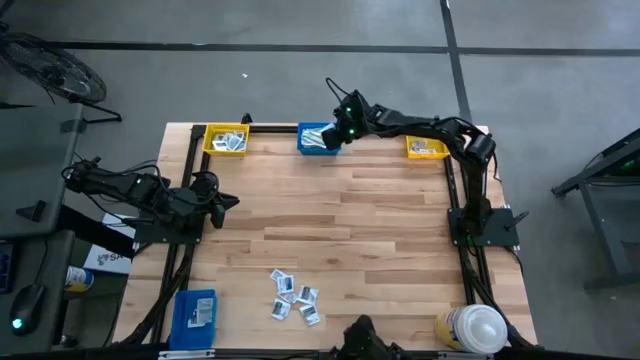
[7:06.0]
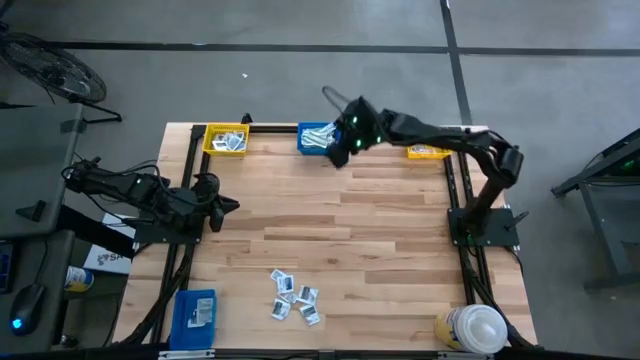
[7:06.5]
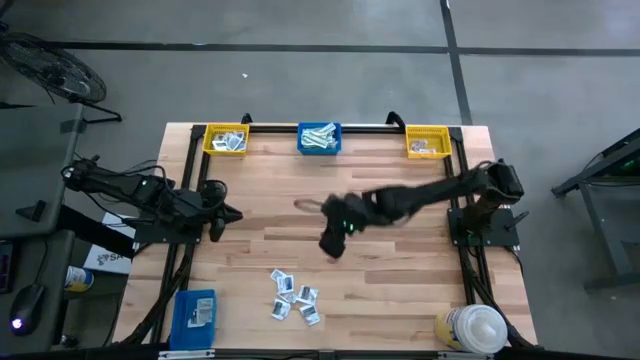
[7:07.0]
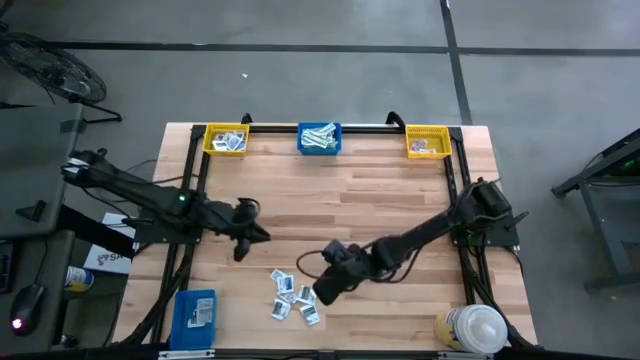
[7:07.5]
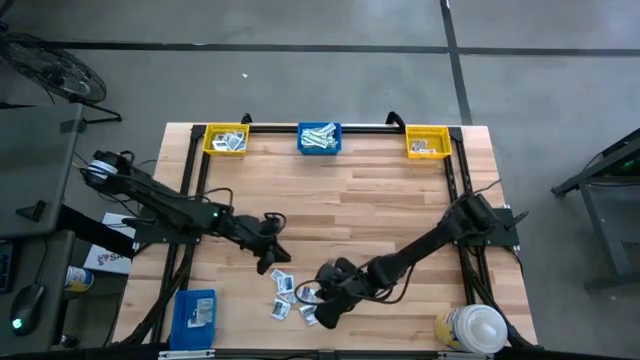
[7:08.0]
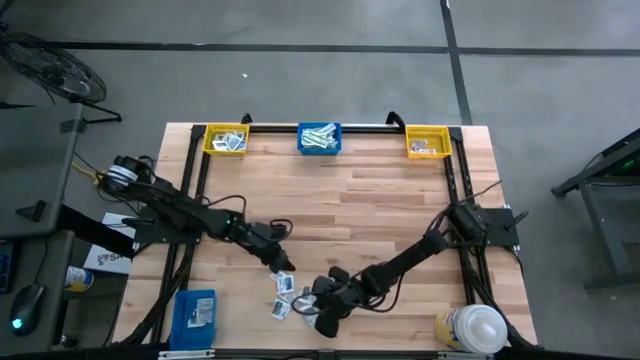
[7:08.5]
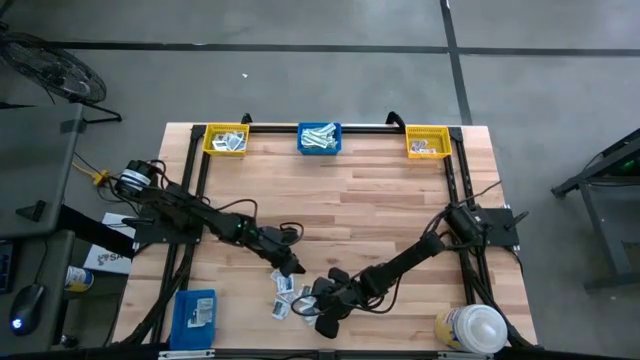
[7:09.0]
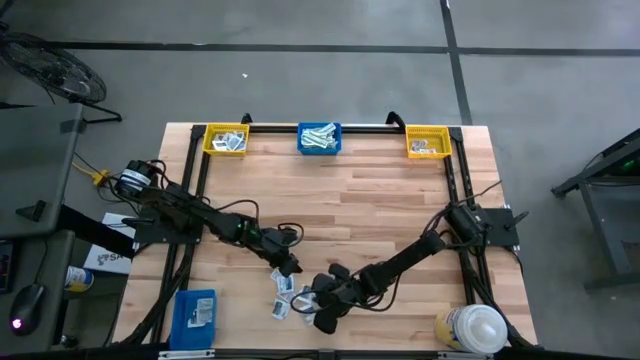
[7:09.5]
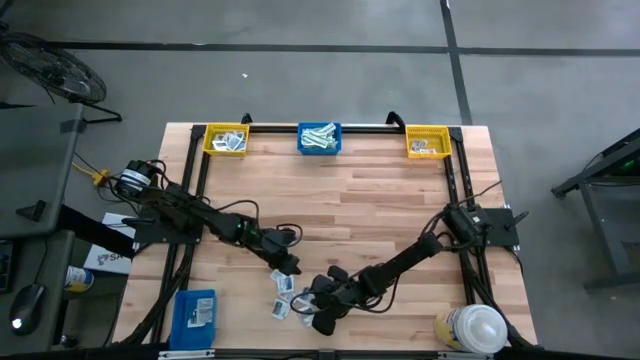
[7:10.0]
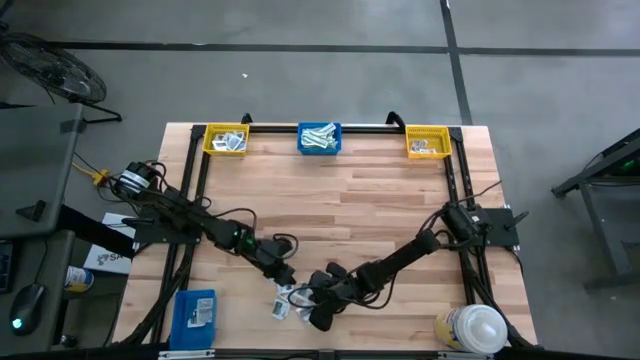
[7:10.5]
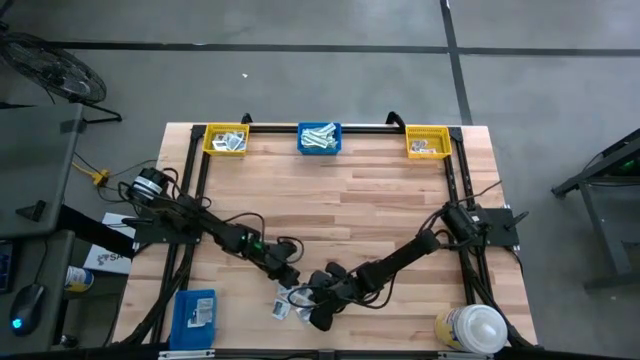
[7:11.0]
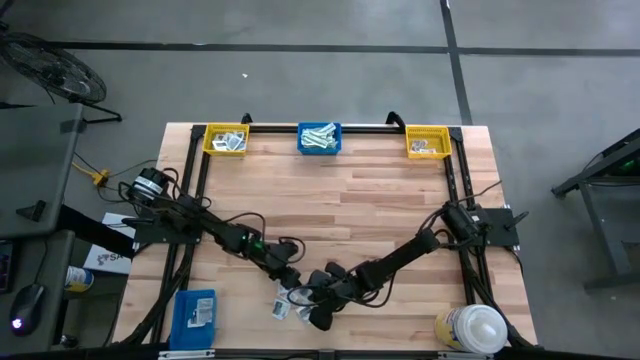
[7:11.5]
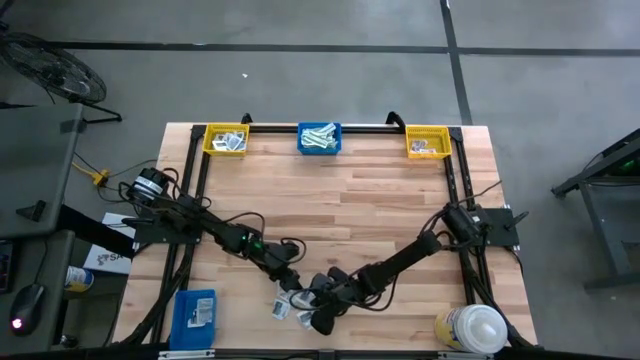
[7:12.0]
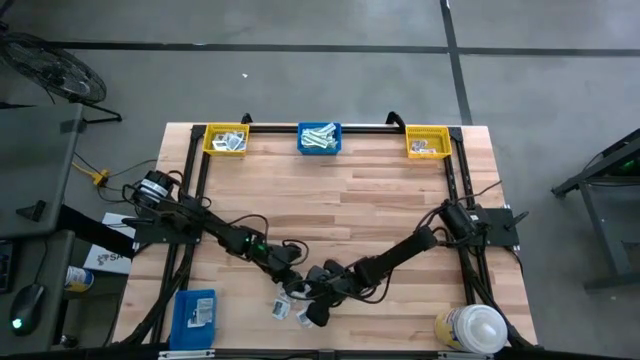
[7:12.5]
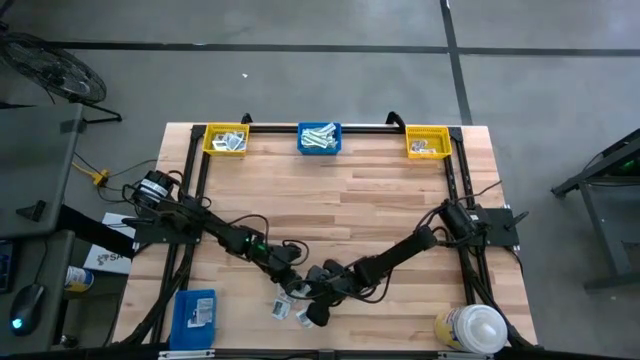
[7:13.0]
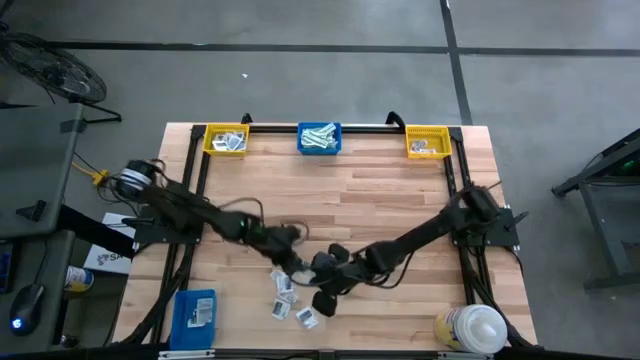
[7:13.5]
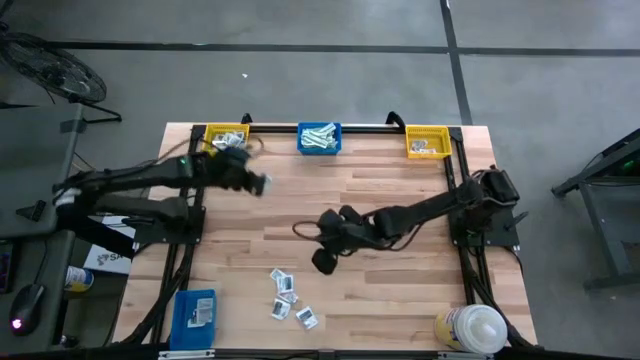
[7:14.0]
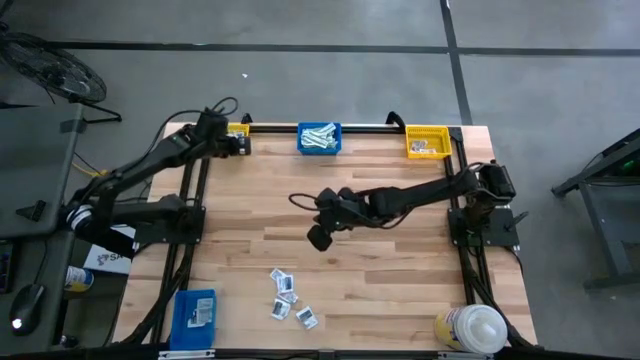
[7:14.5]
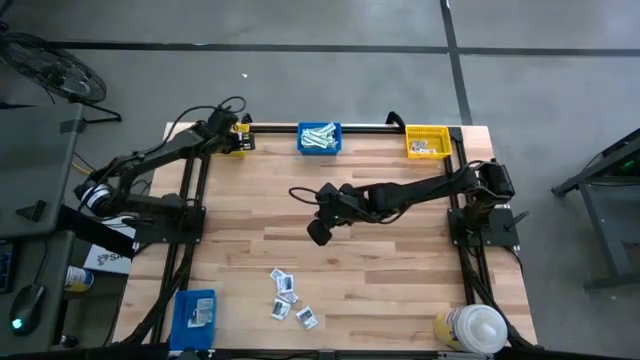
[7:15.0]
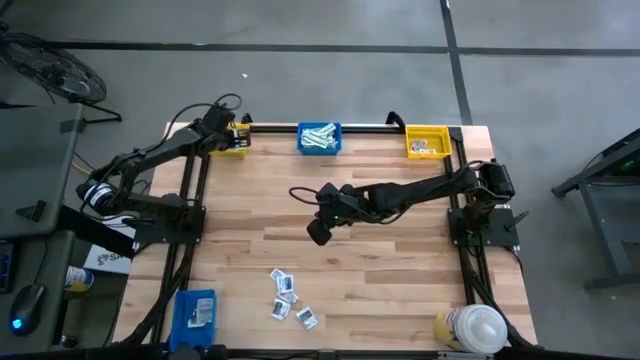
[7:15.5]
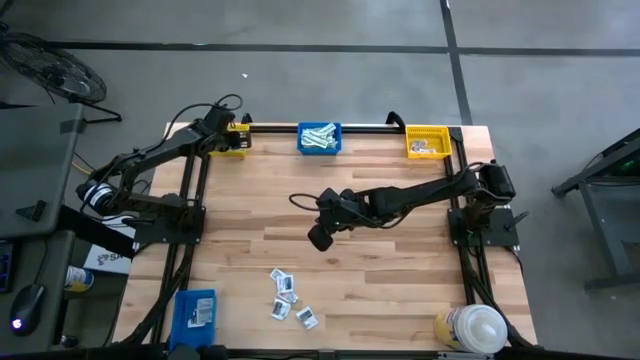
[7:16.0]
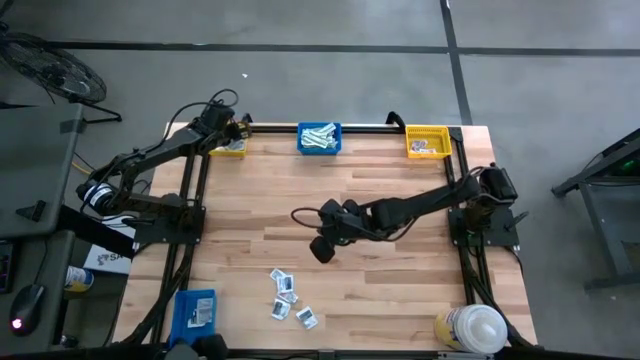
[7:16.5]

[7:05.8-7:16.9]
Task: Pick & Place First Aid Supplies
Put the gray towelette pack into the left yellow bin

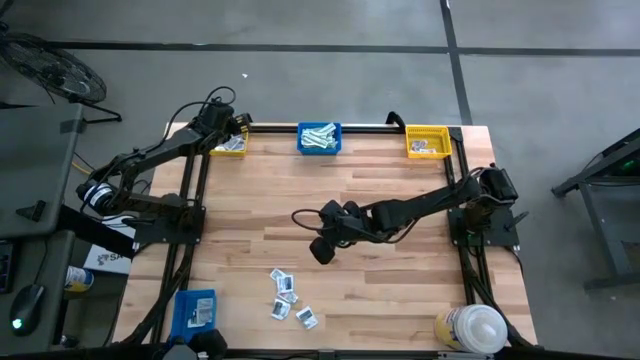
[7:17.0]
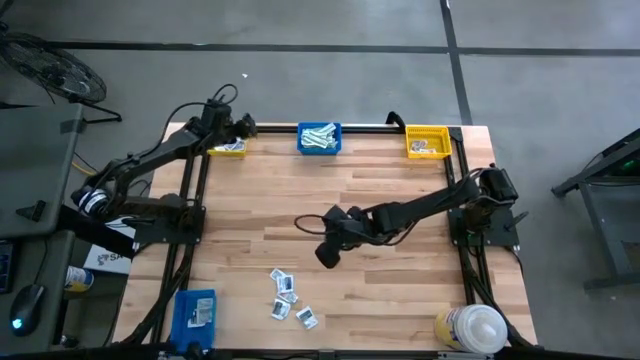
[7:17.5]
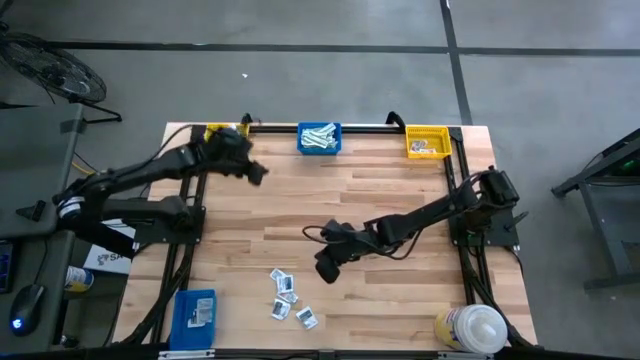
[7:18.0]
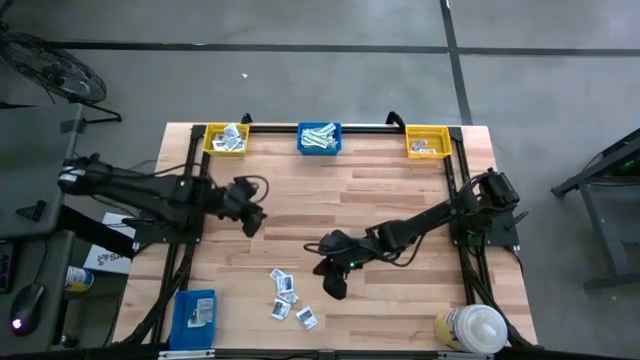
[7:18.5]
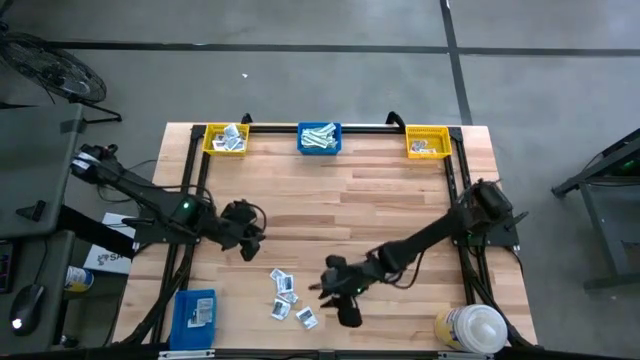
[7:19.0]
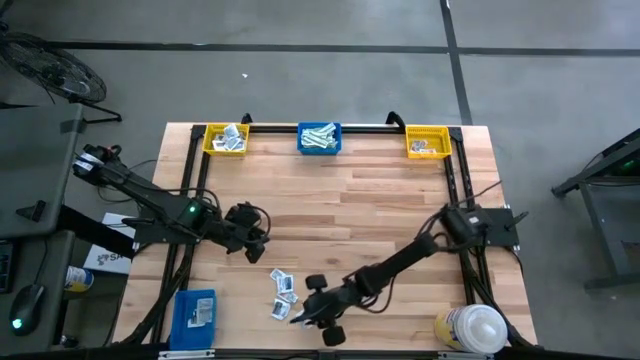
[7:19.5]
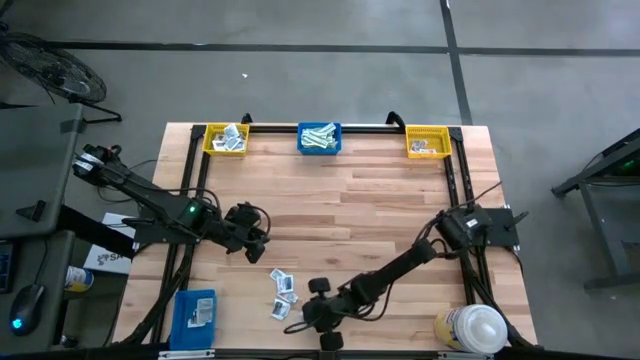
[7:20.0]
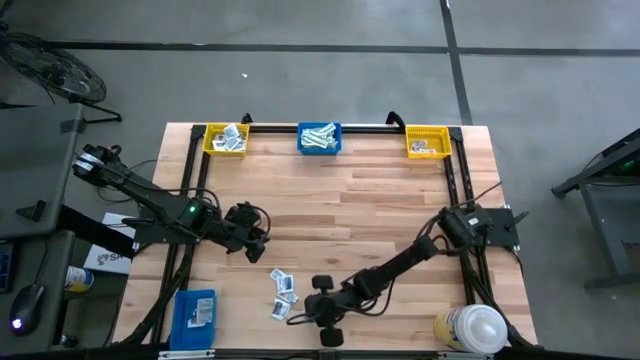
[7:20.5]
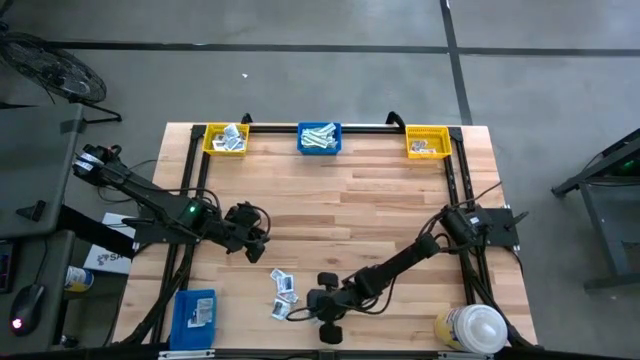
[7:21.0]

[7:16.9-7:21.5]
Put the gray towelette pack into the left yellow bin

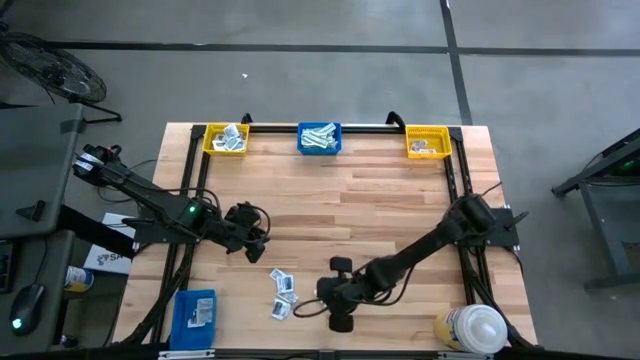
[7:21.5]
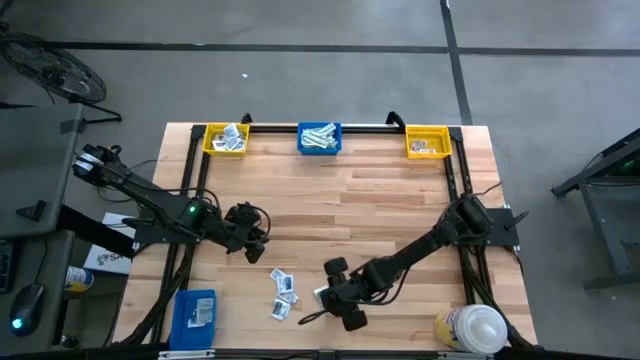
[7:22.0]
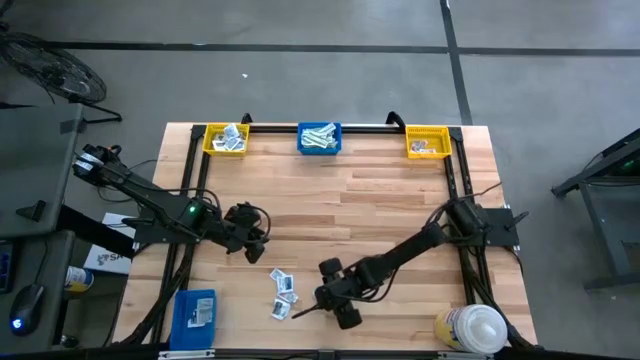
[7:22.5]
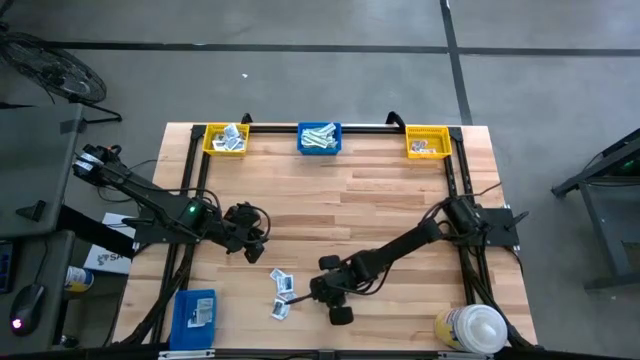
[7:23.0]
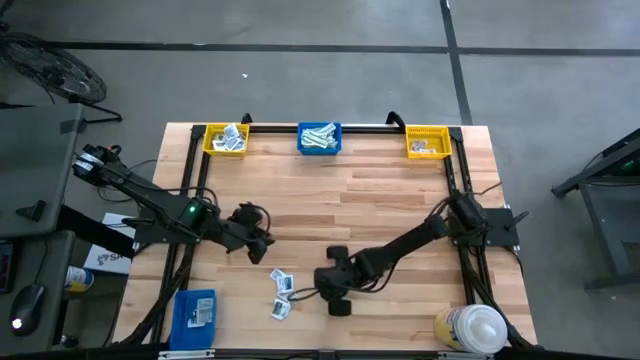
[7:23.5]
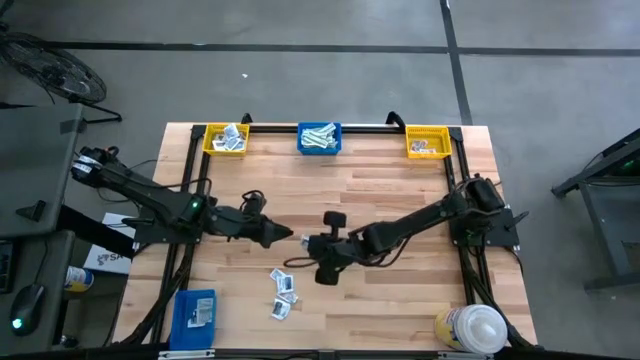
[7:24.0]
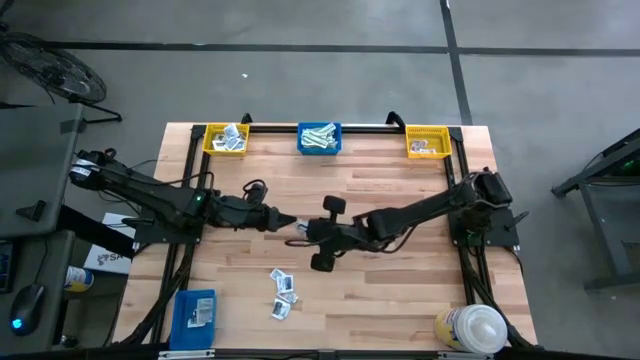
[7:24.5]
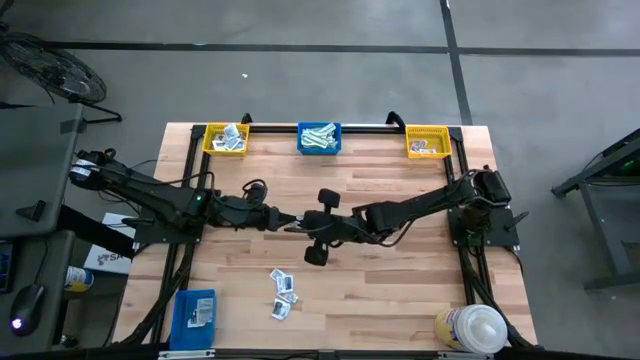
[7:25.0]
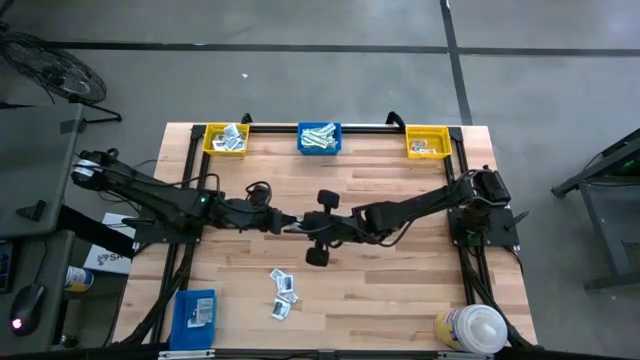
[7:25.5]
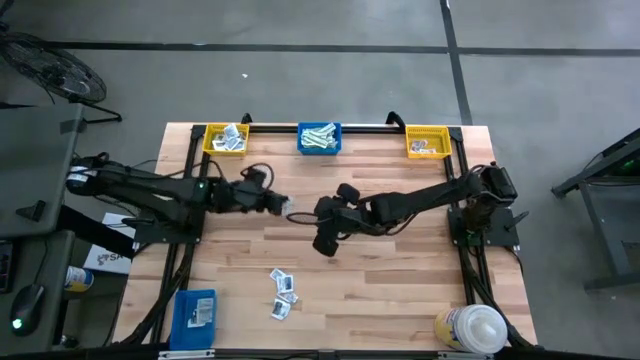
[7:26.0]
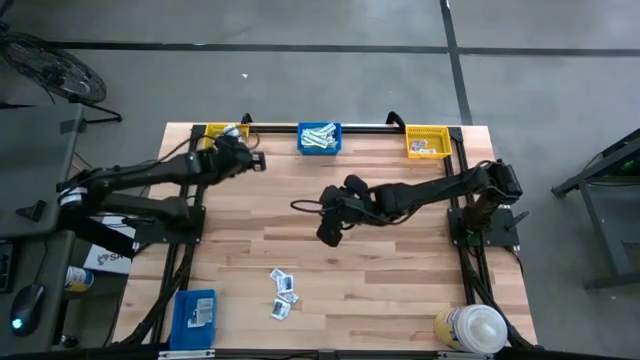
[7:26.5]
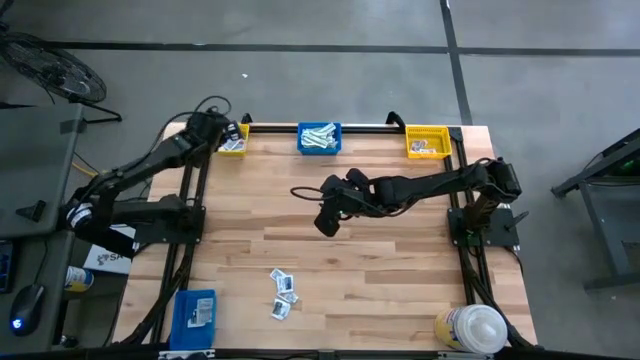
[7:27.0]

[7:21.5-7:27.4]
Put the gray towelette pack into the left yellow bin
